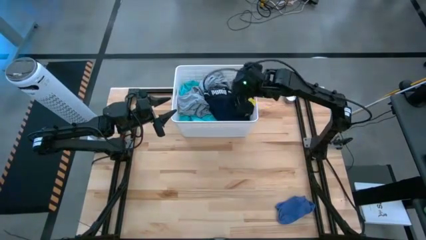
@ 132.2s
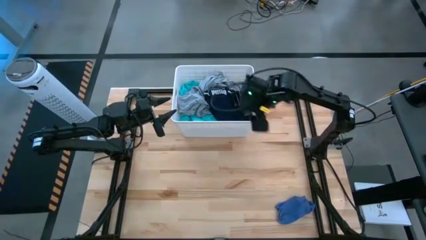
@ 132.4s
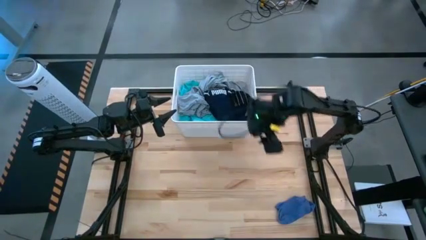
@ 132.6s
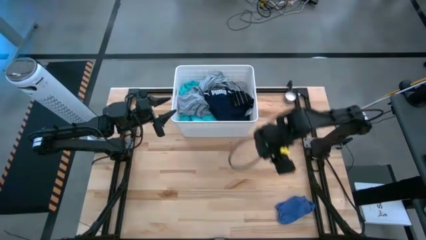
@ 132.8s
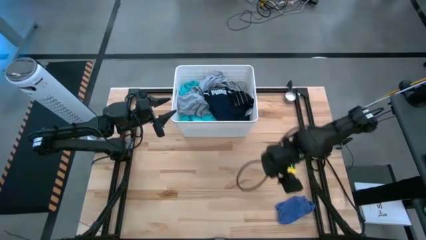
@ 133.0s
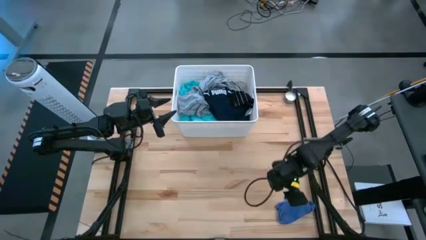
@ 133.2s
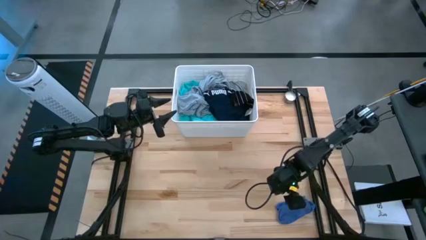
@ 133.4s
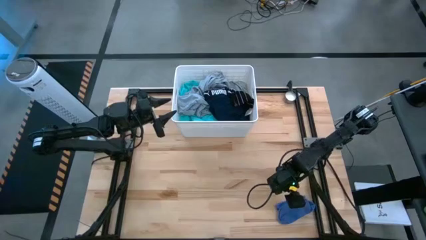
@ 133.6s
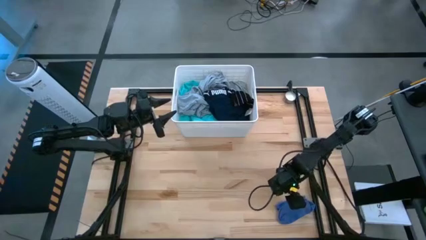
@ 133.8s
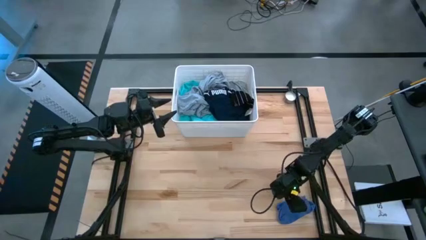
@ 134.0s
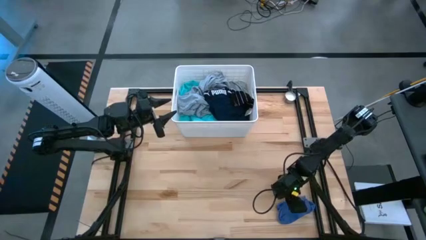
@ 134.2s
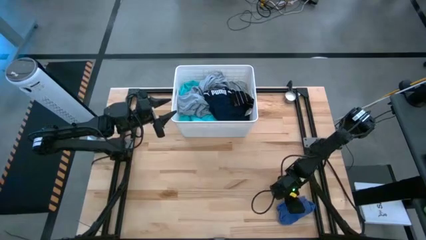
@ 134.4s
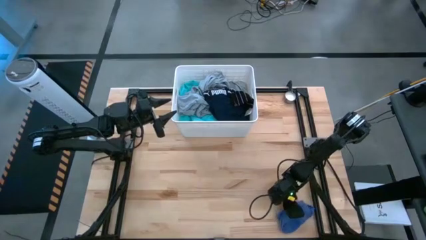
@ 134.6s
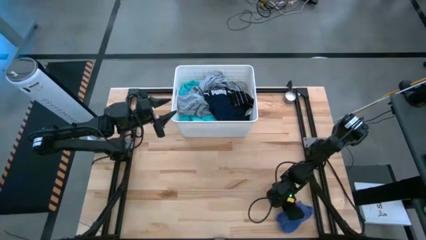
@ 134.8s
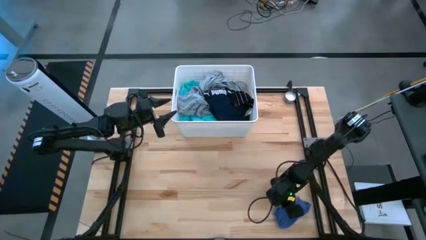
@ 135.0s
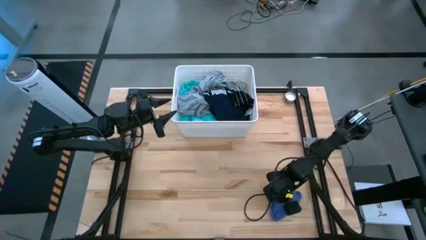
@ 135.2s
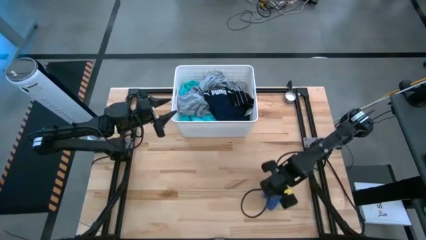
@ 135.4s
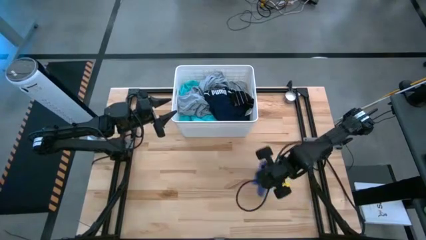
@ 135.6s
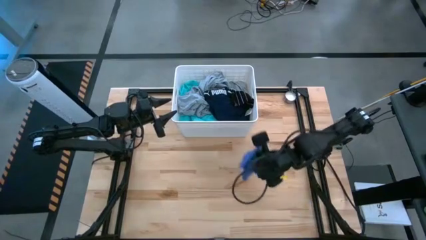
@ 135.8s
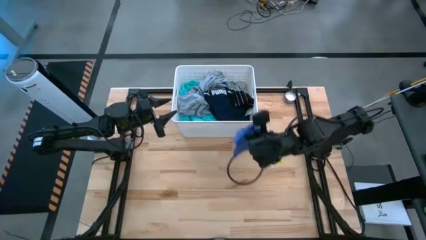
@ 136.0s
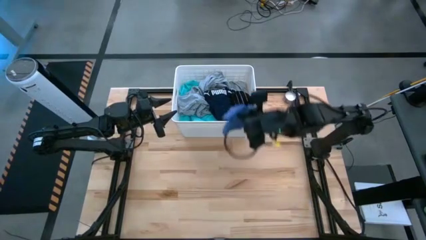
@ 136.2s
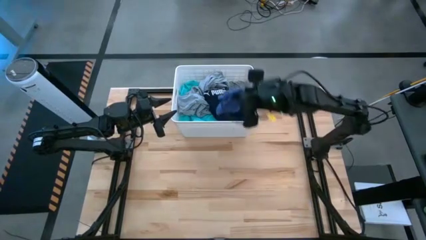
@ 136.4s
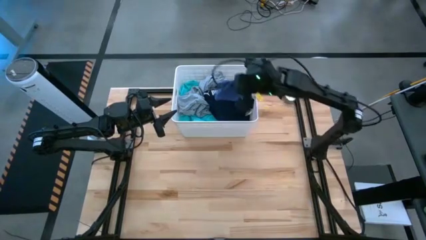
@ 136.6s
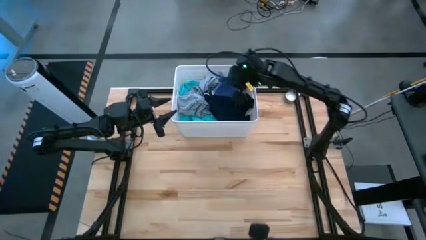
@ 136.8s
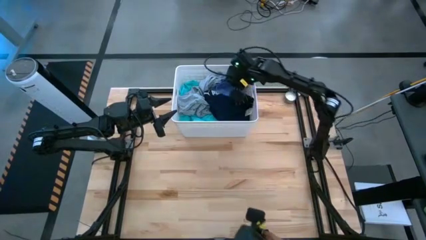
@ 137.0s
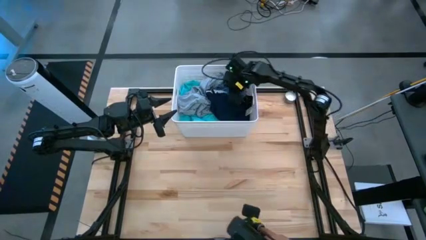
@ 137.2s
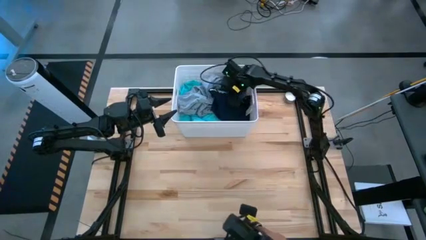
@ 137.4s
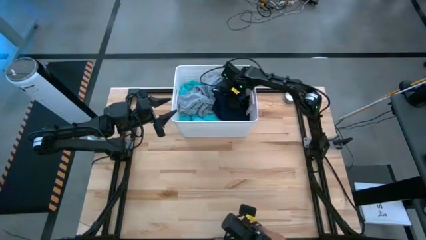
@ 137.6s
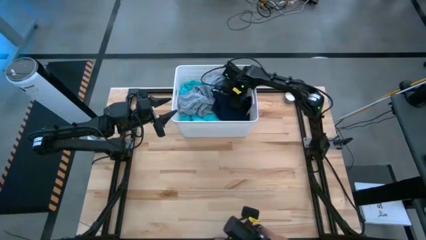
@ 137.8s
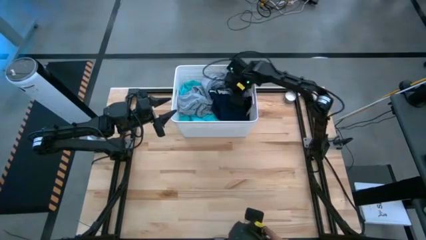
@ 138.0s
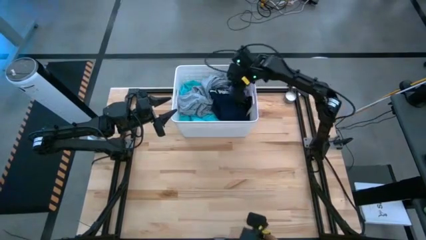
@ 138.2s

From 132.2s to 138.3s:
Task: Sort clothes
Put the blue sock into the white laundry bin

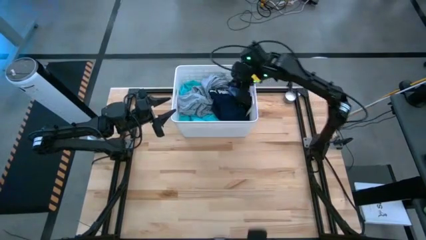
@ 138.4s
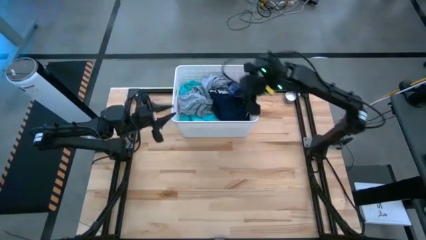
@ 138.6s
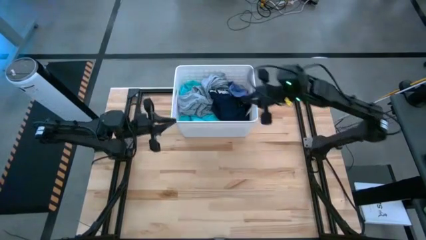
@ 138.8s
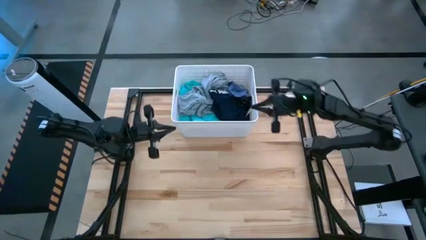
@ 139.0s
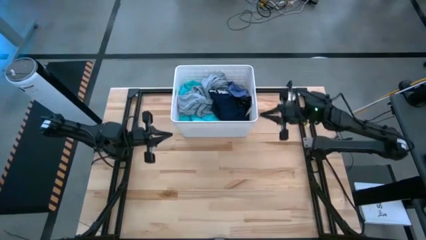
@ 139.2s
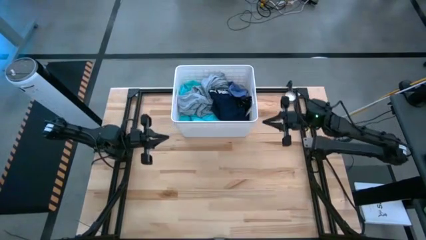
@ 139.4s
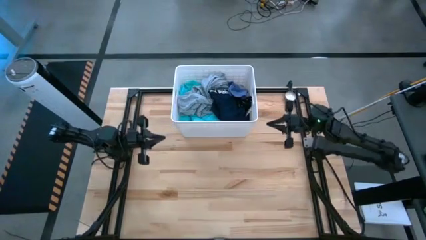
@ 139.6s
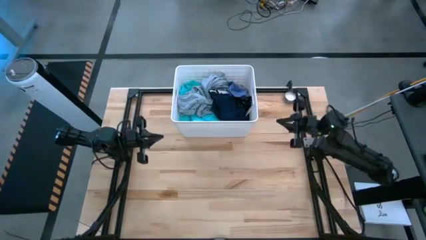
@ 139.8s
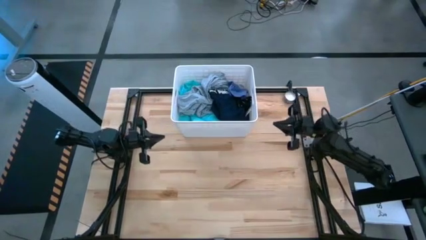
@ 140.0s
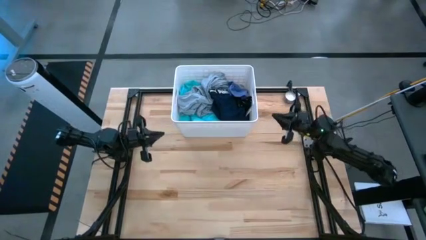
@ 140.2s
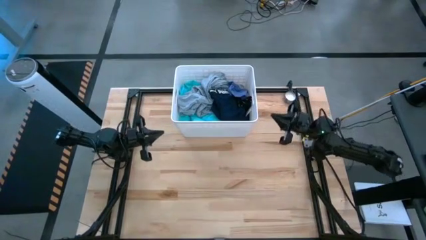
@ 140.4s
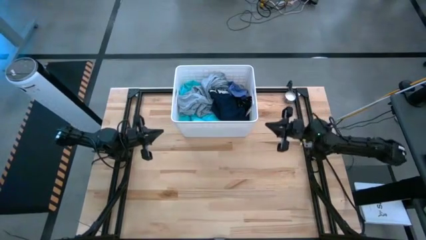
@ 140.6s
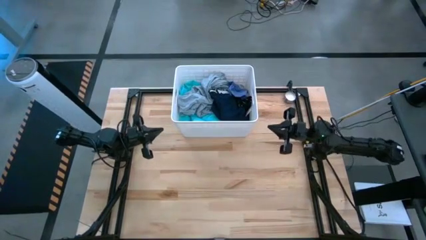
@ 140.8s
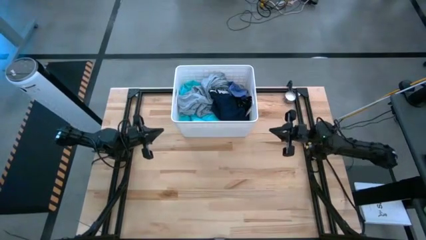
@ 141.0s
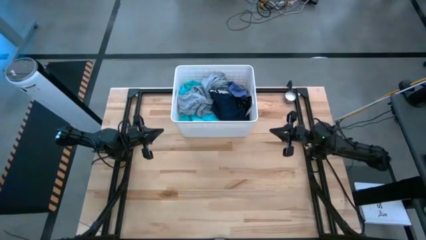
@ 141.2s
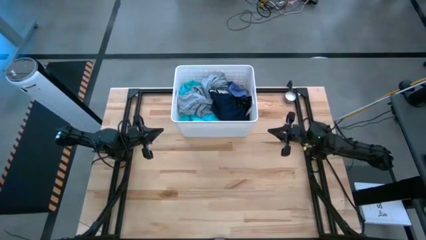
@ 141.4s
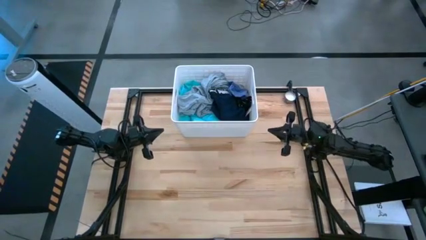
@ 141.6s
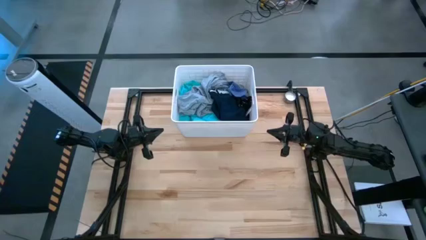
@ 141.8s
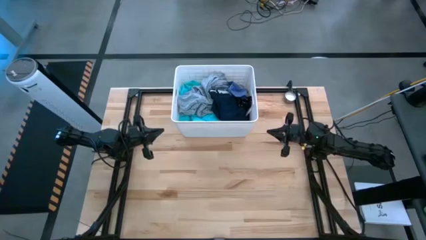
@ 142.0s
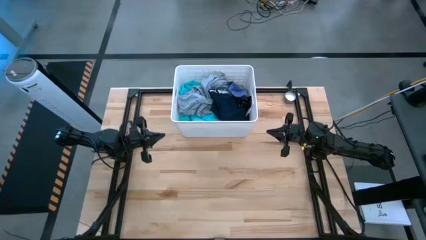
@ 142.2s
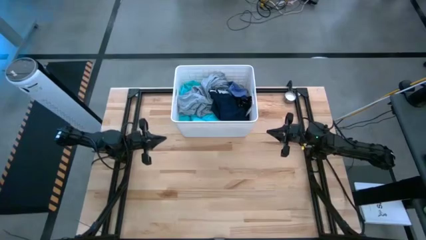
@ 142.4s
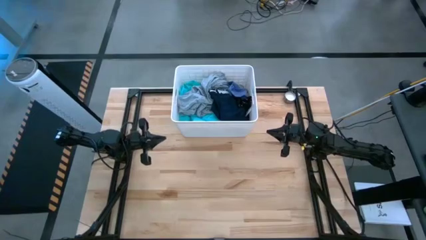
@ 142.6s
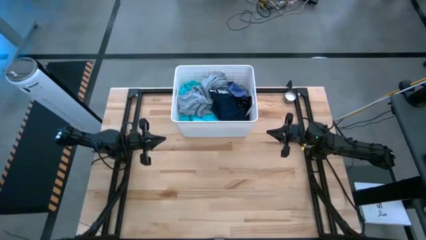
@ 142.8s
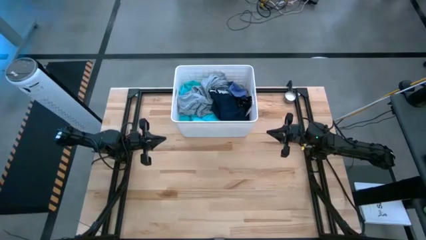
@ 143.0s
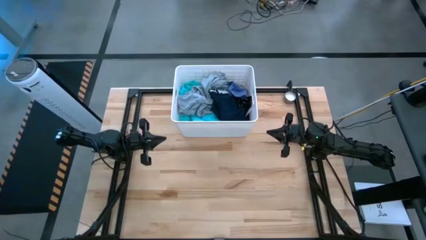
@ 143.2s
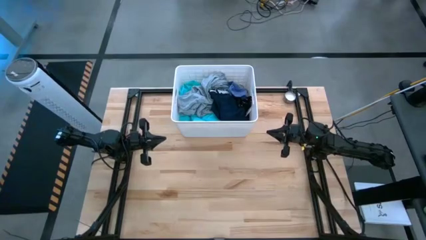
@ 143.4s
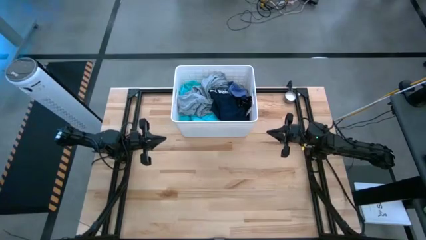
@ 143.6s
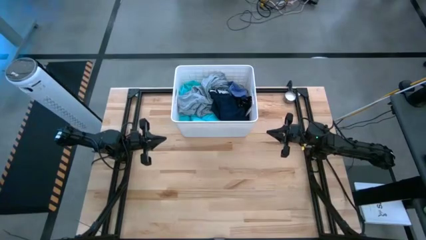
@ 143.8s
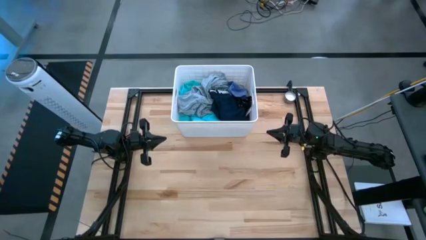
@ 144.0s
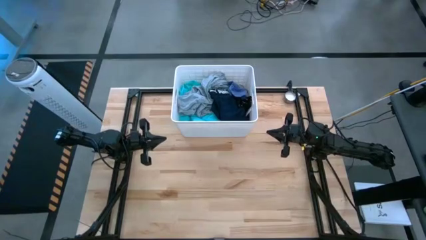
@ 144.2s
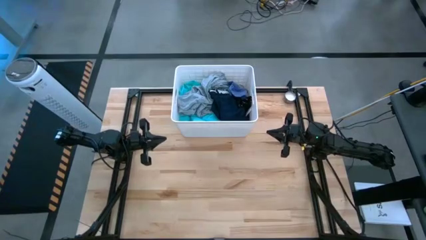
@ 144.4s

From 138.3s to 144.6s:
Return to Home Position

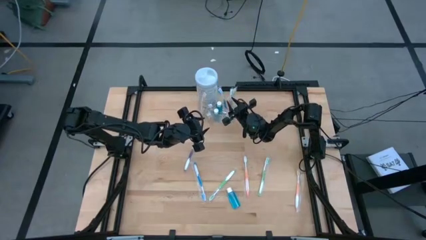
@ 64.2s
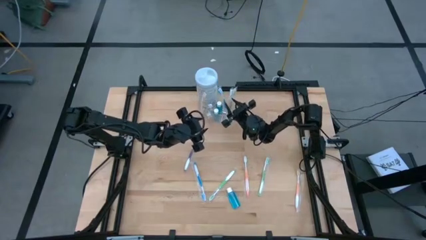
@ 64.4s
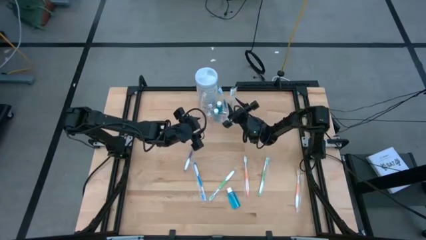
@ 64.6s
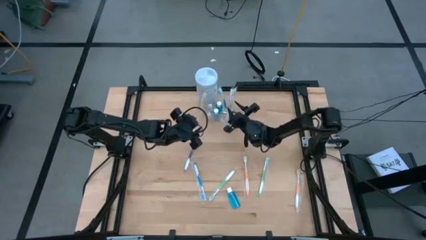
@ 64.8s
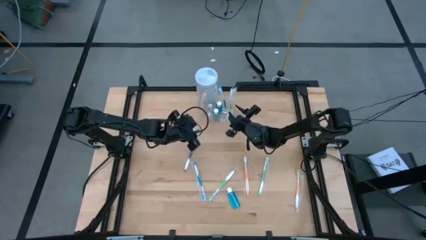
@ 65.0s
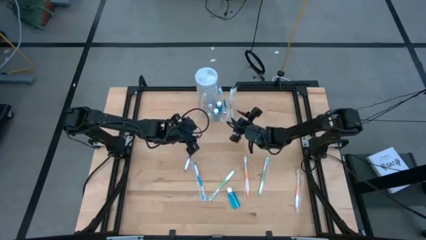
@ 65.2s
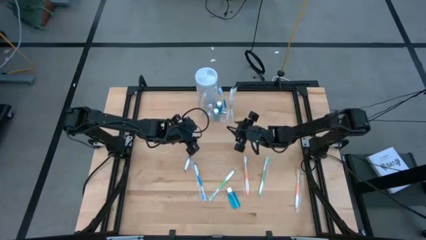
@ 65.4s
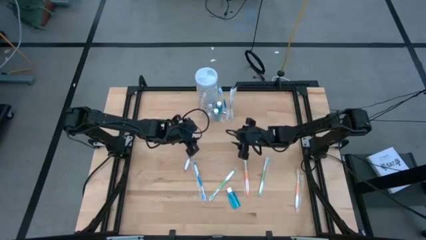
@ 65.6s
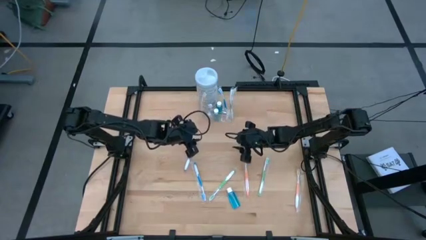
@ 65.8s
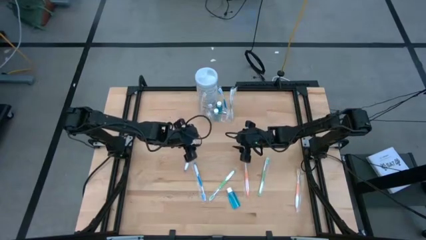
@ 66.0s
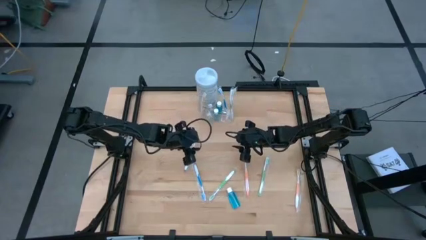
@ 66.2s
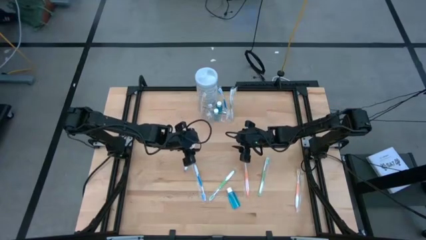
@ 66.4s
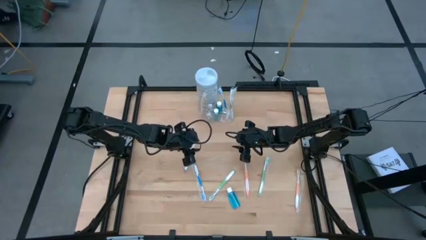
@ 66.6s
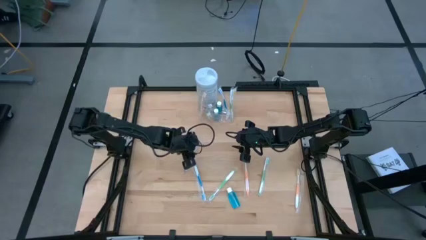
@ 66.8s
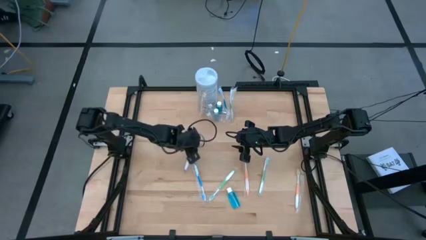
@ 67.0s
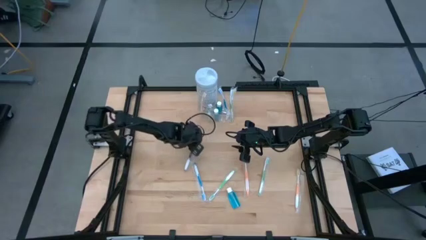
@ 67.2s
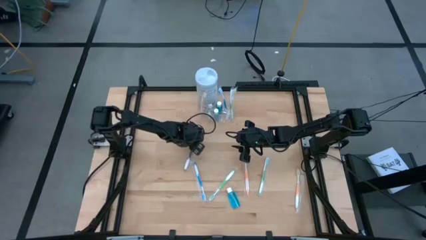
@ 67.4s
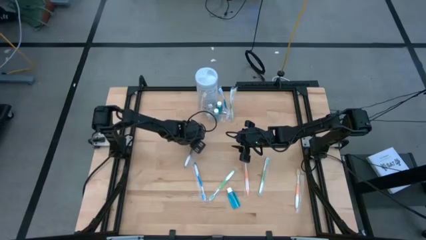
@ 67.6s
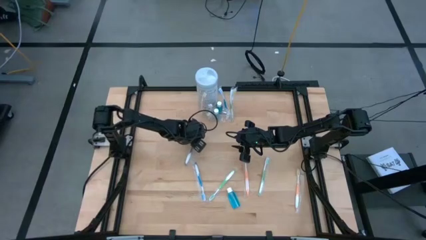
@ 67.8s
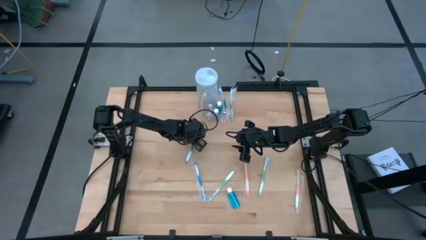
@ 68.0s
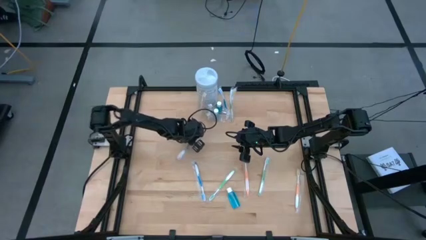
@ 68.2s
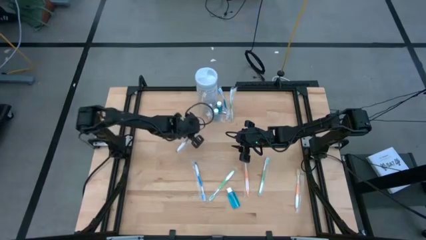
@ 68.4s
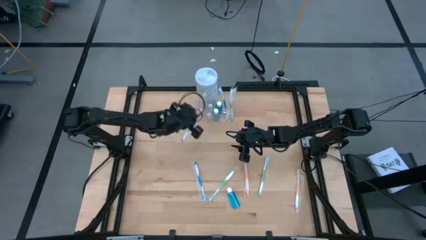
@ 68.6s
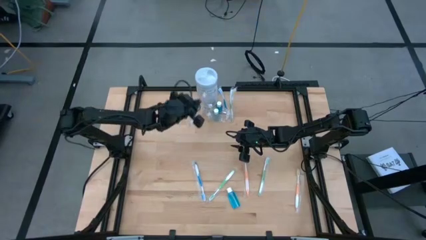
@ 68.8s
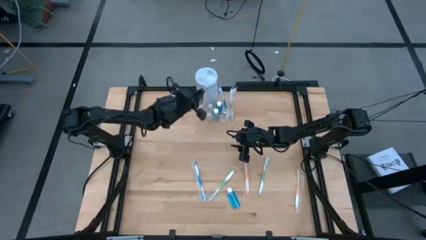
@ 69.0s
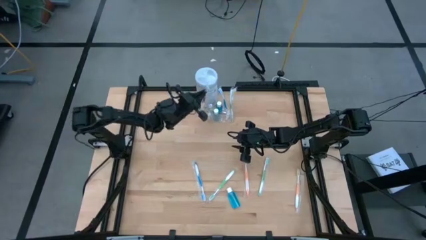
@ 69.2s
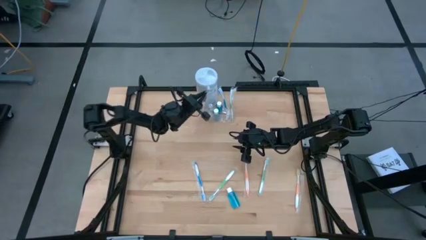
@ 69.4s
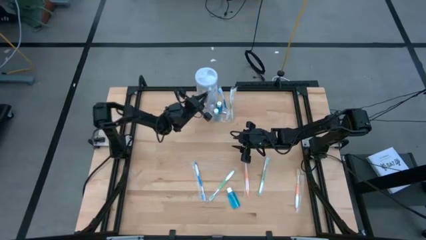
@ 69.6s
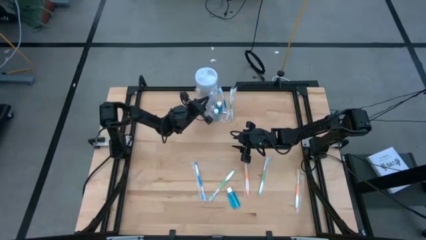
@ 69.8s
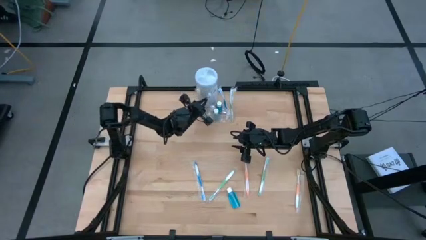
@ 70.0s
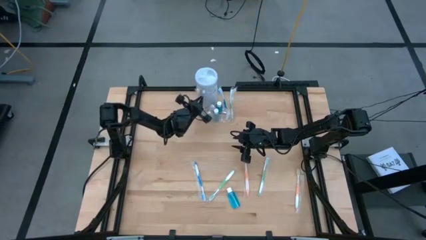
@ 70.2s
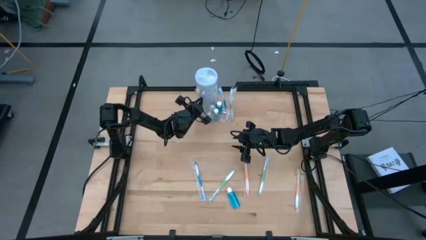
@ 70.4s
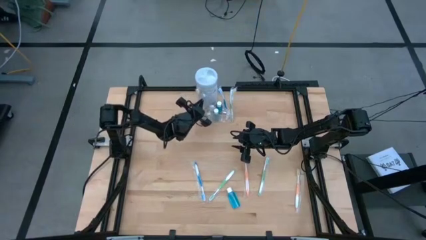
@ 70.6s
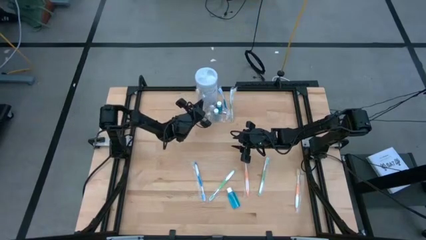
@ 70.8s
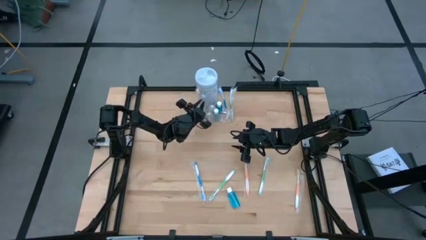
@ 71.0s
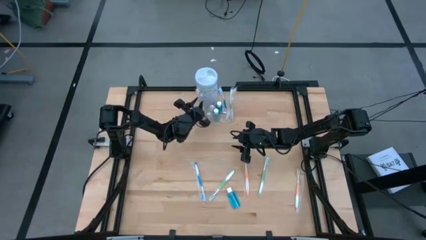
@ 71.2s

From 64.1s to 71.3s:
Task: Pick & Place toothbrushing station
Put the purple toothbrush into the transparent organizer
